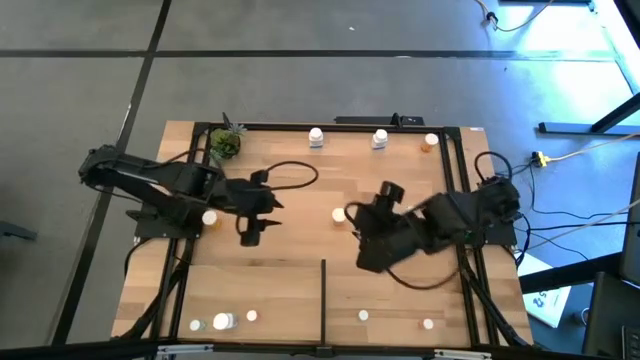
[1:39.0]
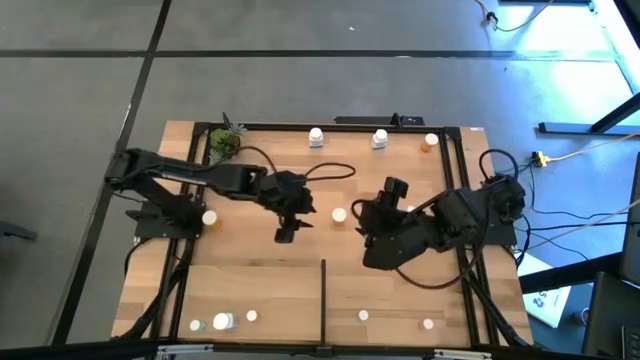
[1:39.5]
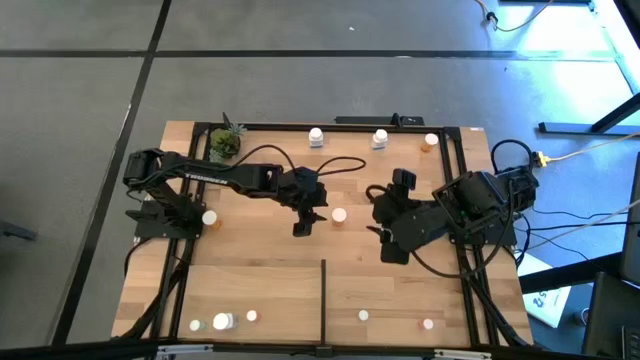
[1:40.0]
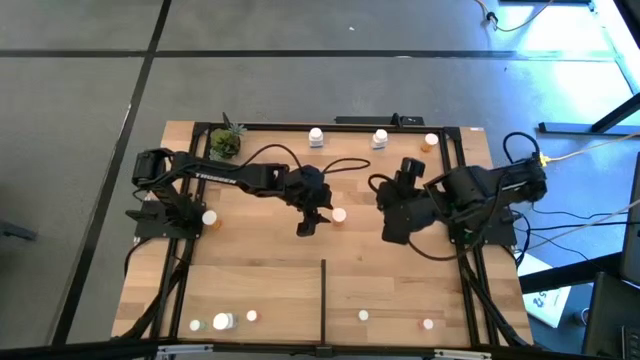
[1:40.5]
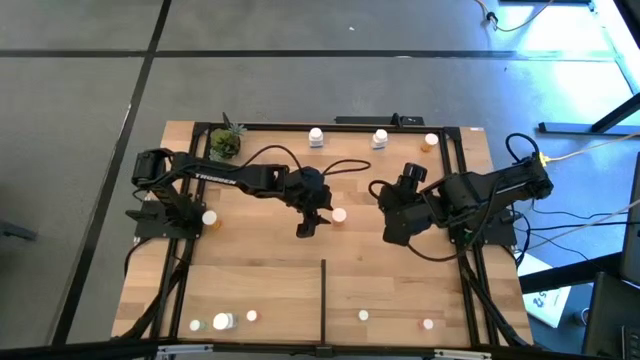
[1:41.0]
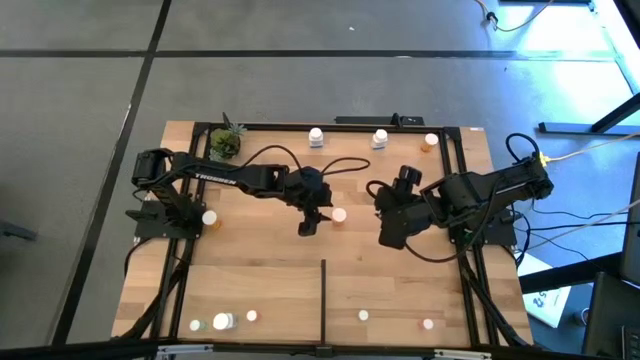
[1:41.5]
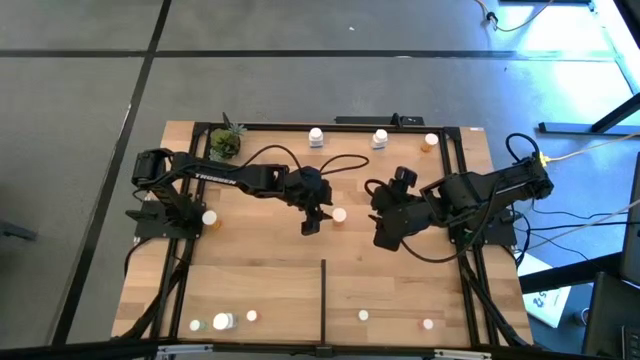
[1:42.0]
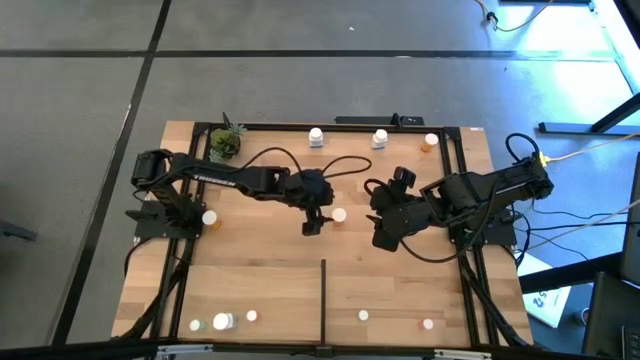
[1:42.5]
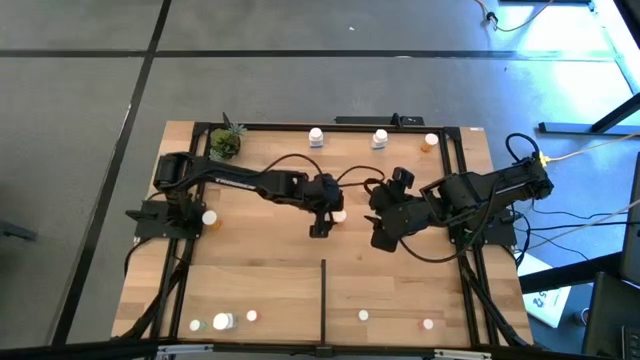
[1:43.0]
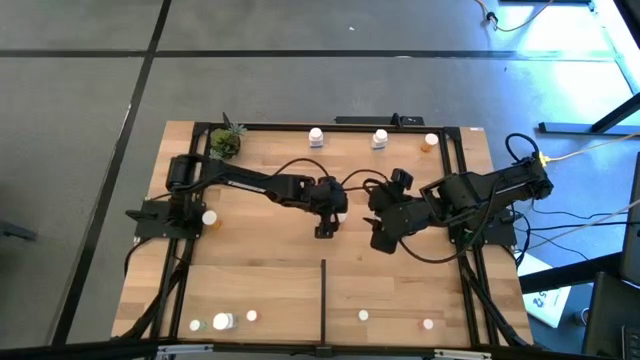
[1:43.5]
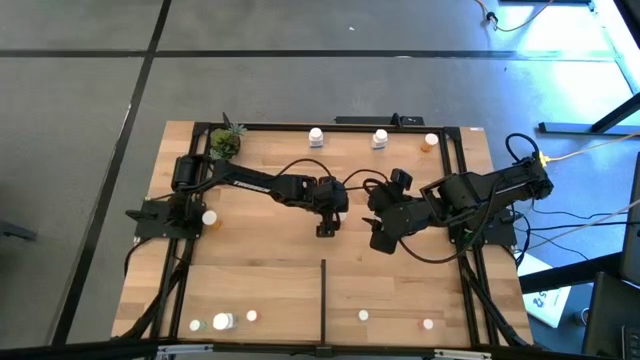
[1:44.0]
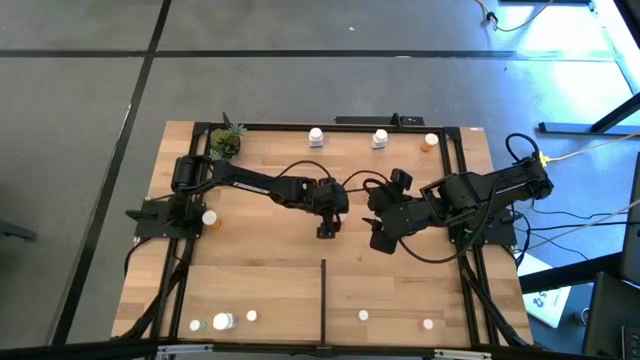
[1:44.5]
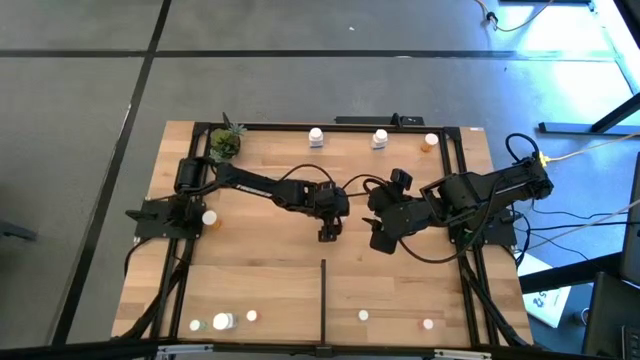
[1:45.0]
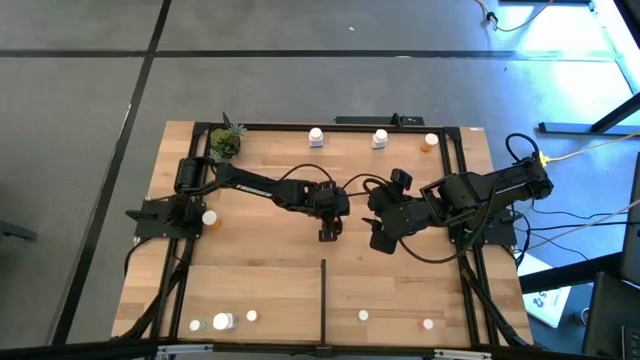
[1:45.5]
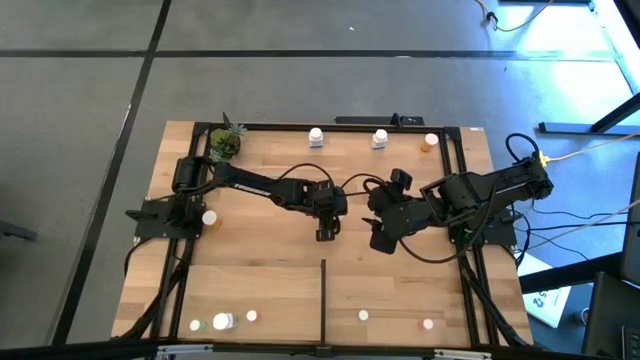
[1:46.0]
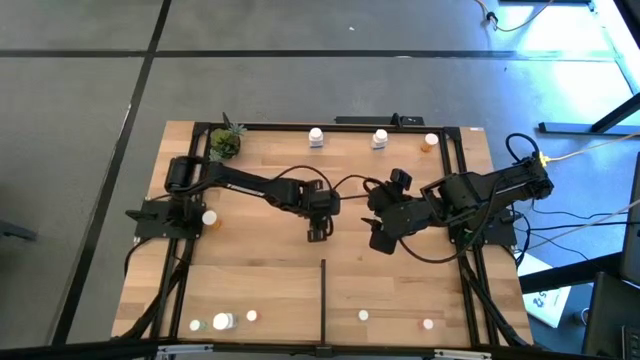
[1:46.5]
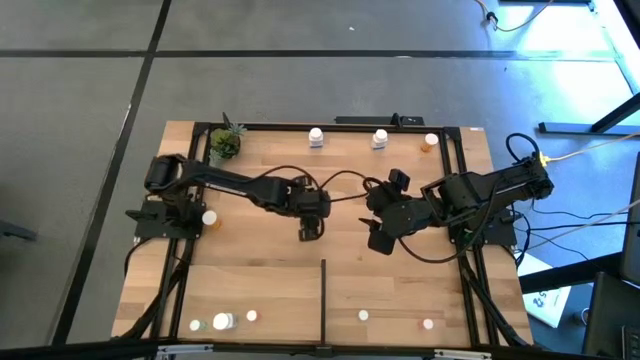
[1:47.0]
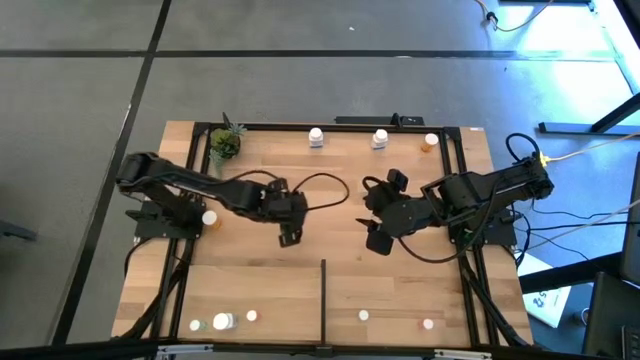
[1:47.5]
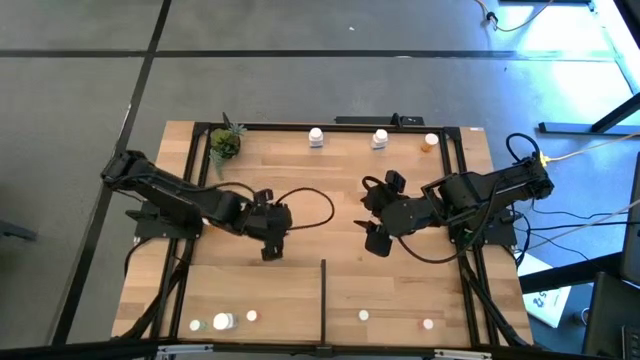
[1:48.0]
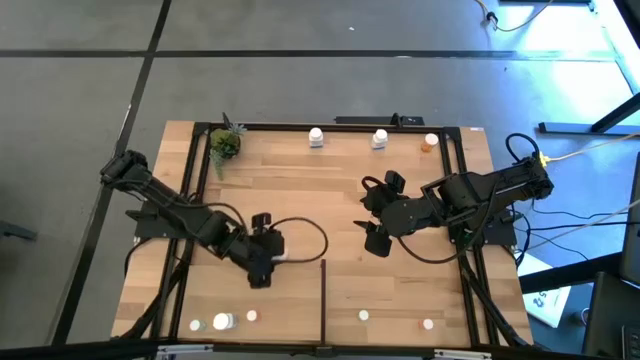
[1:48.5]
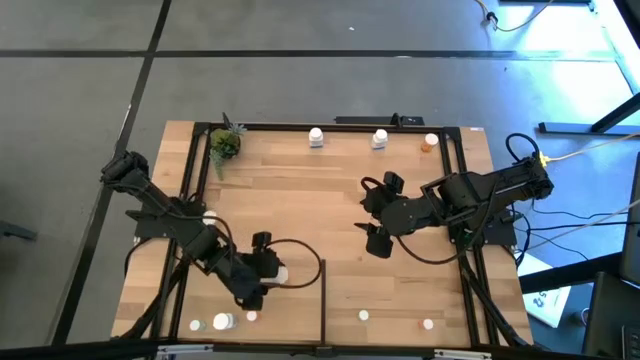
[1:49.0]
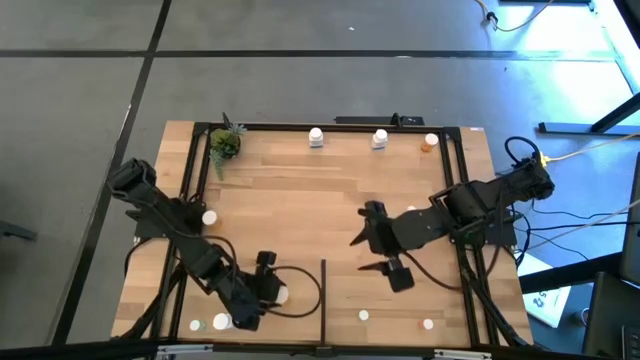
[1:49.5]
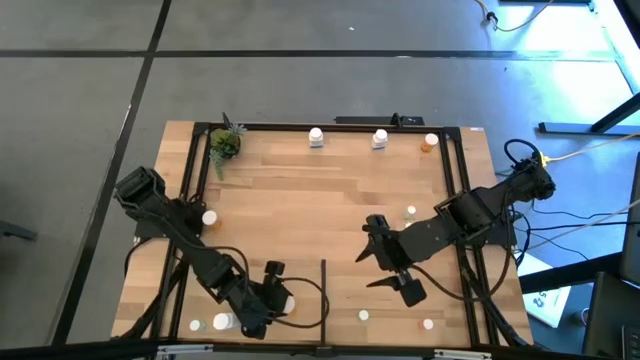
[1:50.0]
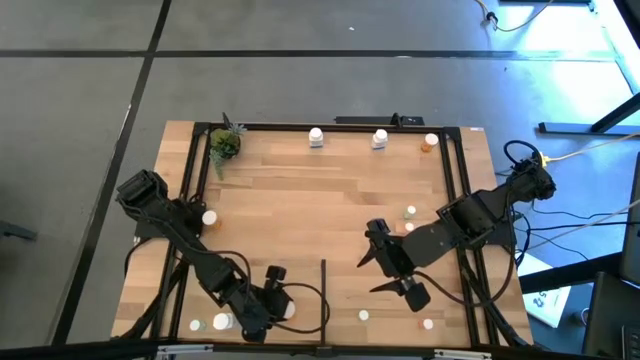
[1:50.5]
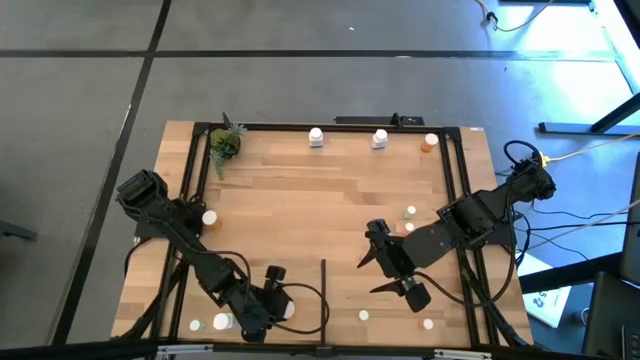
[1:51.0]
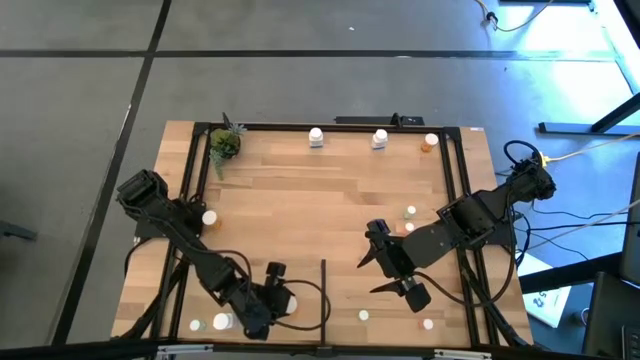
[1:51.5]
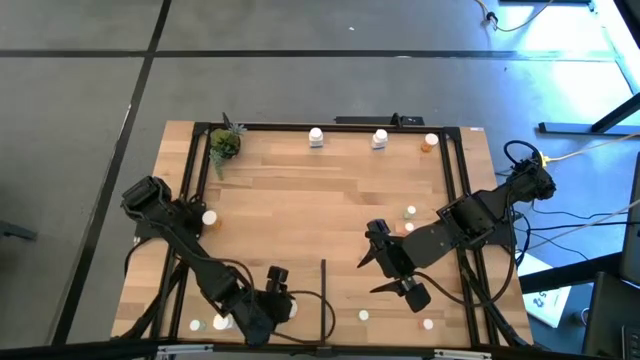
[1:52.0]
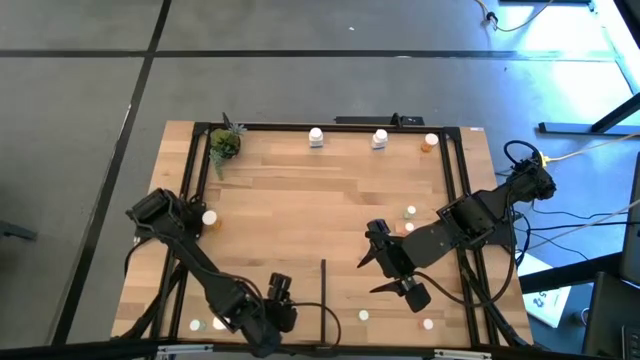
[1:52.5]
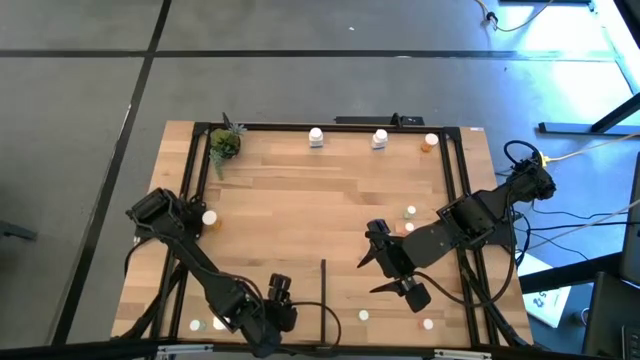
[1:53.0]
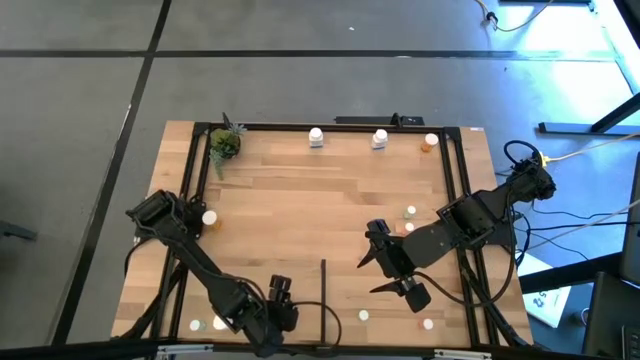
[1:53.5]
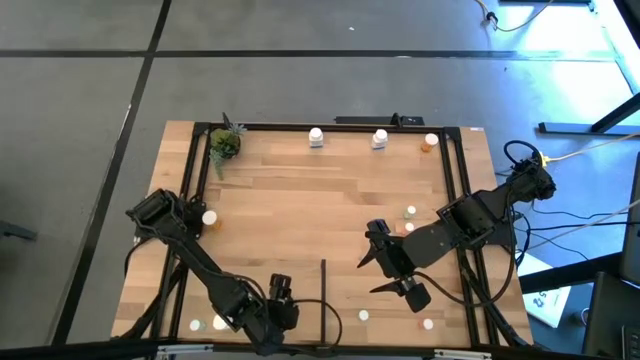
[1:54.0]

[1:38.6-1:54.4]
Task: Pick and place medicine bottles onto shelf by color
Put the bottom right orange pill bottle on the shelf

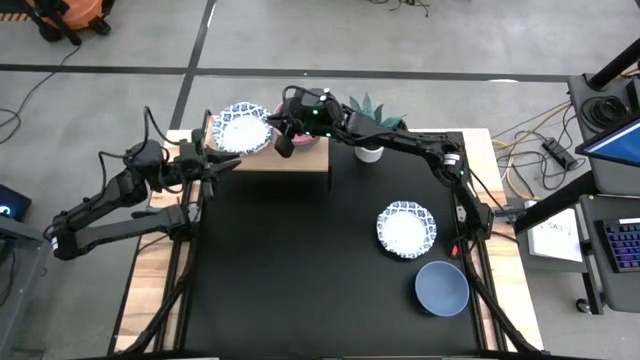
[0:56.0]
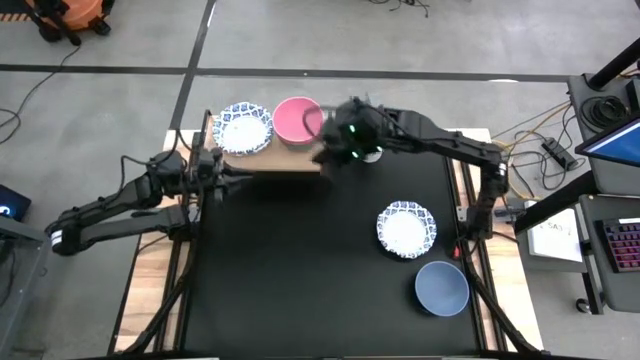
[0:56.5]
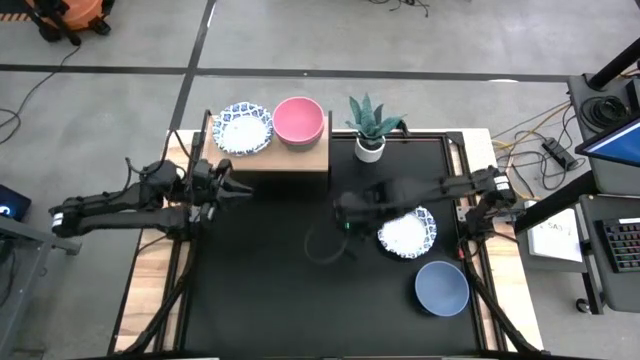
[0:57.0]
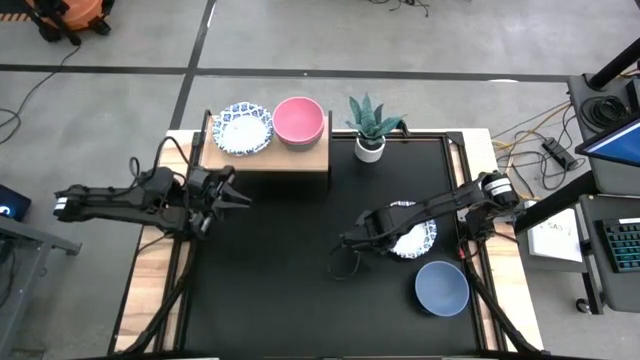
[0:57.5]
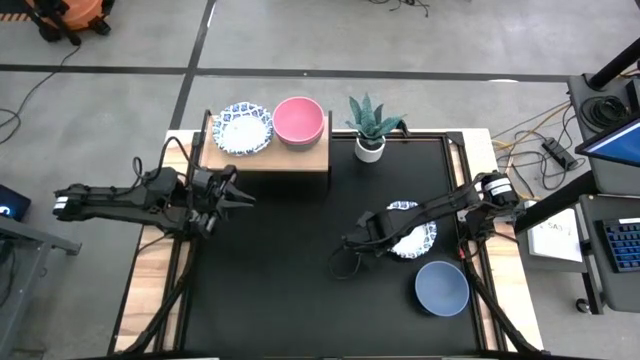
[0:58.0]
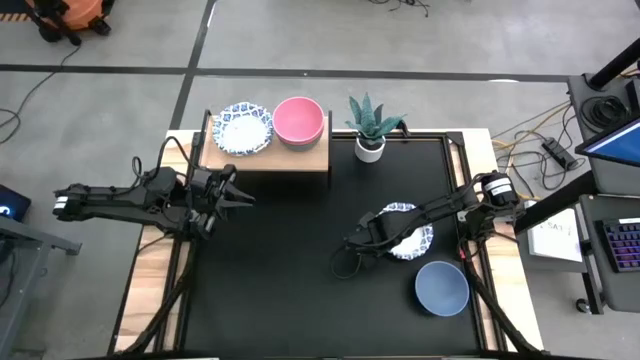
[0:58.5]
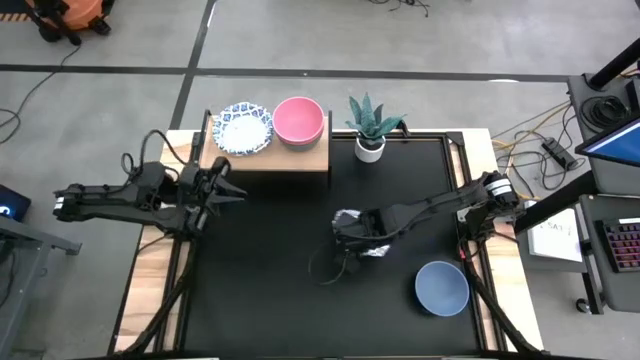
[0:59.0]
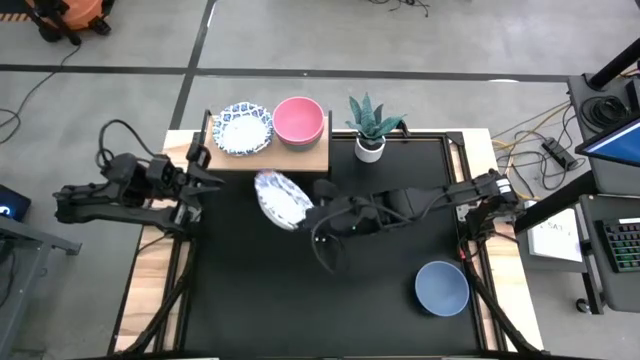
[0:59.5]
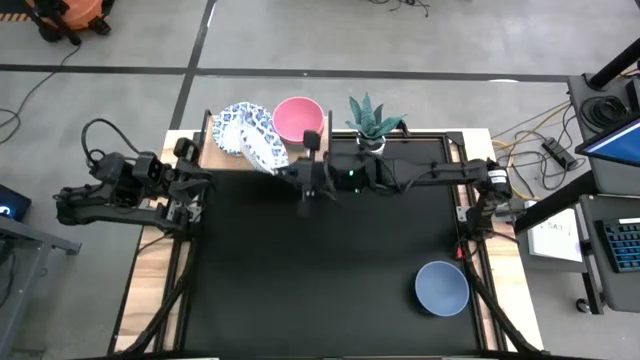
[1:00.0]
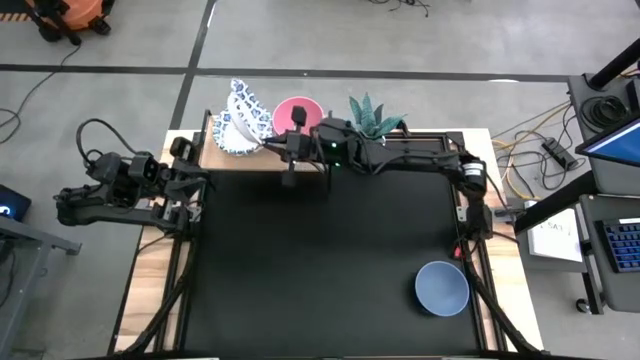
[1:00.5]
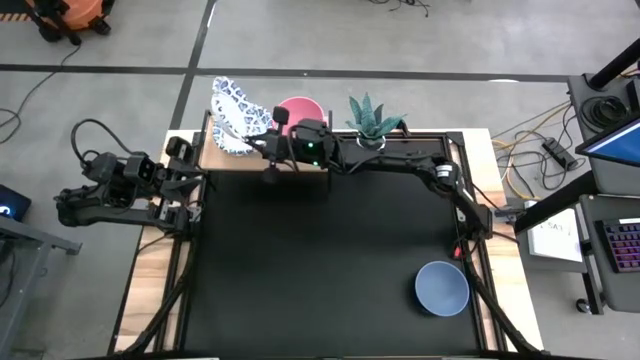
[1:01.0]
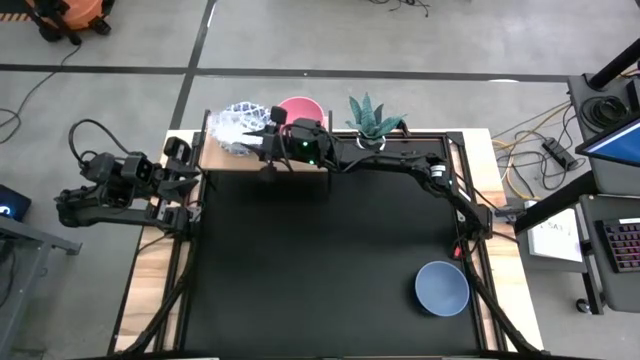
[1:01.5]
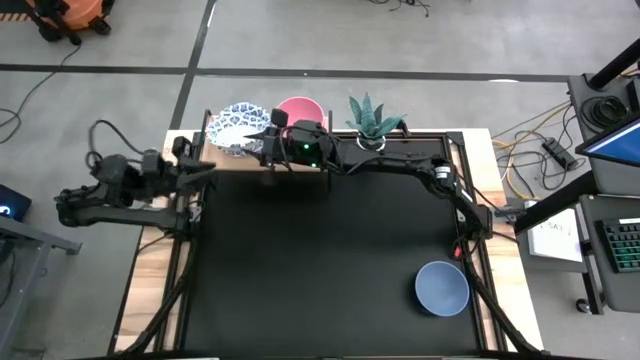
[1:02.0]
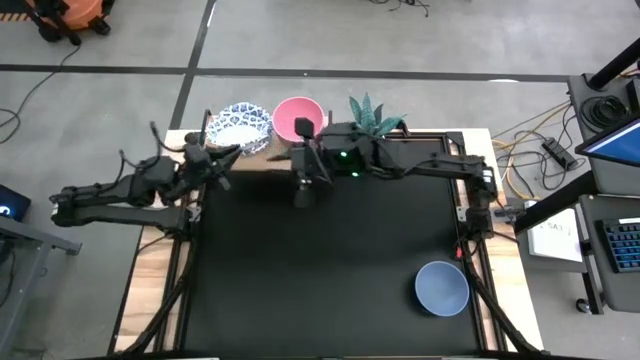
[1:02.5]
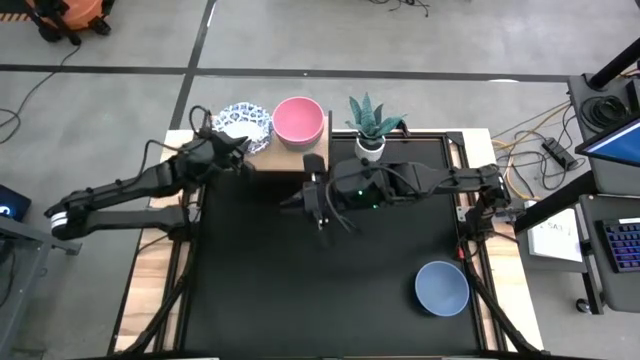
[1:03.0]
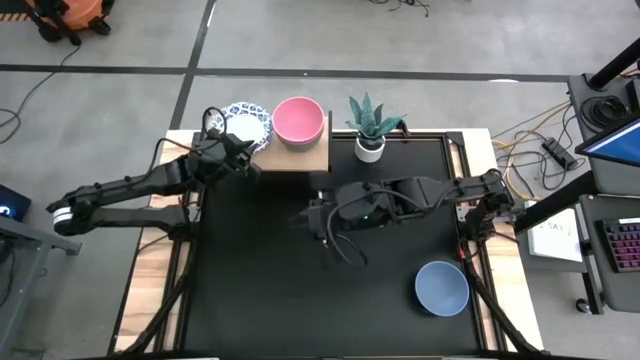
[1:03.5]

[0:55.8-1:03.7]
Task: Place and stack bowls onto a shelf
Stack the white bowl on top of the white bowl on the shelf
